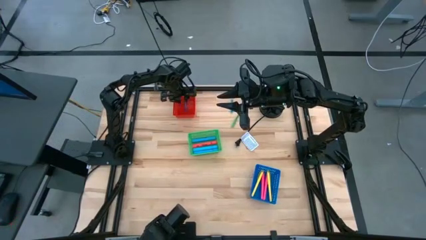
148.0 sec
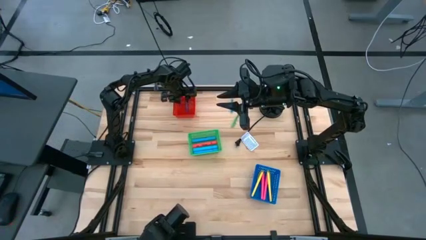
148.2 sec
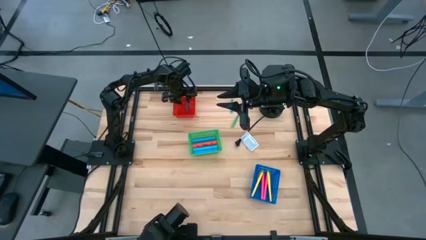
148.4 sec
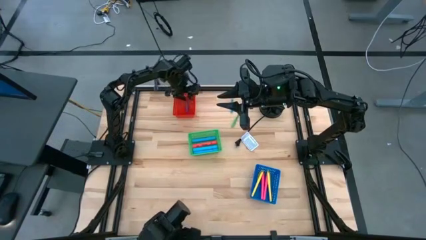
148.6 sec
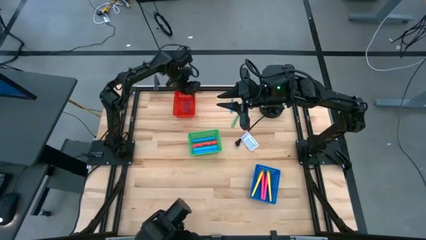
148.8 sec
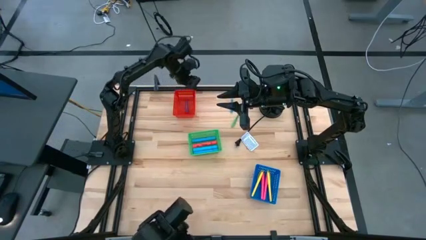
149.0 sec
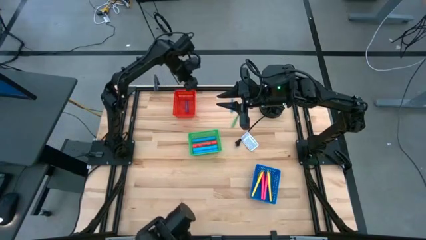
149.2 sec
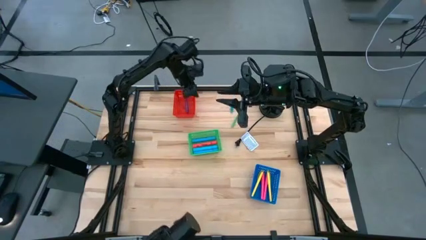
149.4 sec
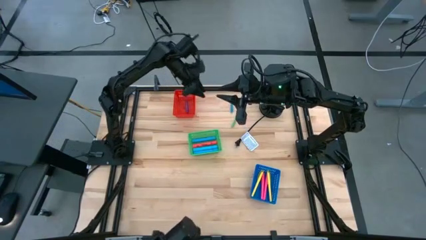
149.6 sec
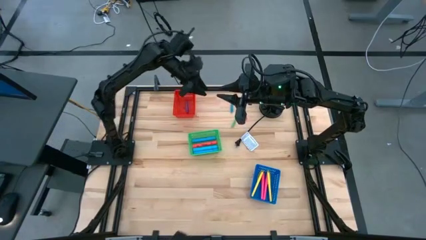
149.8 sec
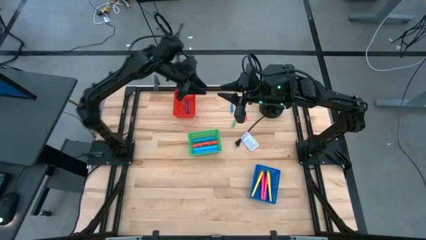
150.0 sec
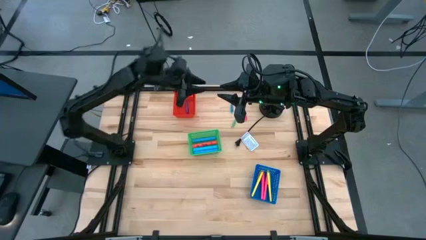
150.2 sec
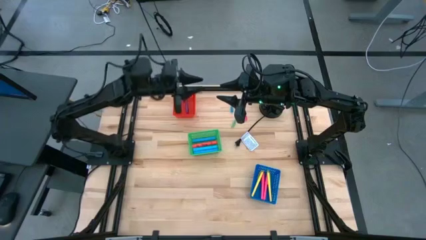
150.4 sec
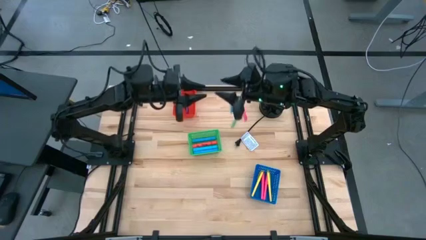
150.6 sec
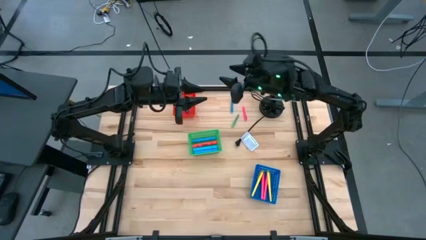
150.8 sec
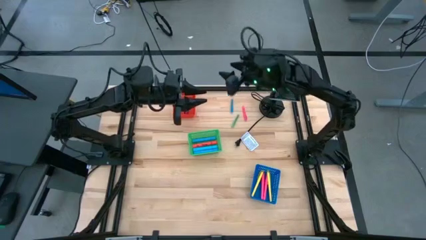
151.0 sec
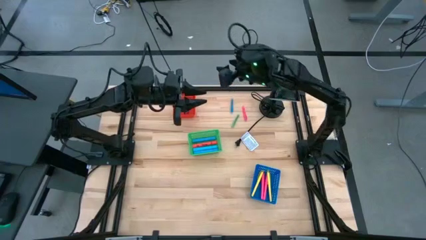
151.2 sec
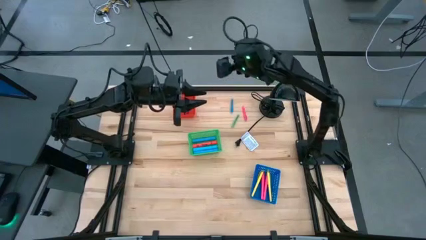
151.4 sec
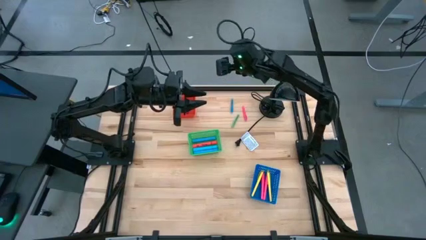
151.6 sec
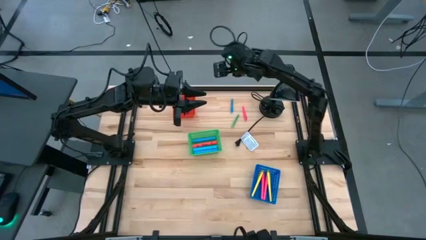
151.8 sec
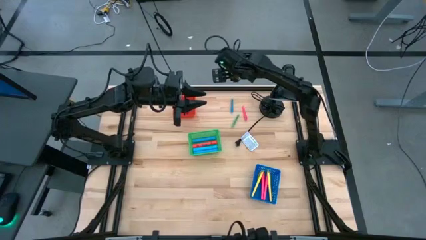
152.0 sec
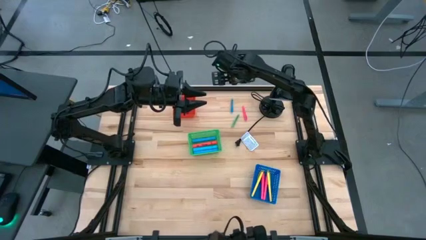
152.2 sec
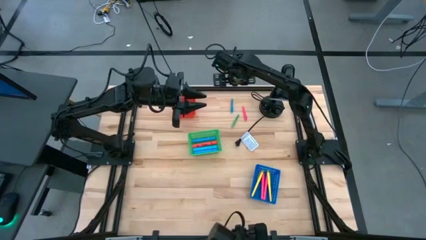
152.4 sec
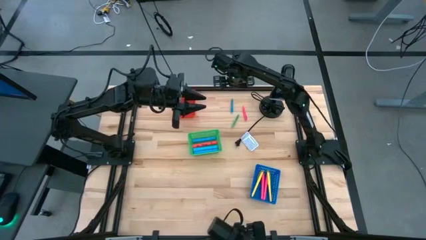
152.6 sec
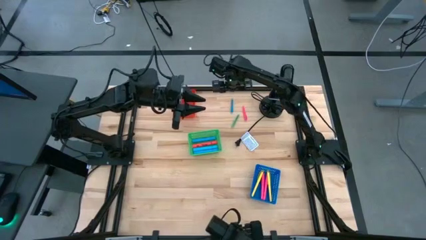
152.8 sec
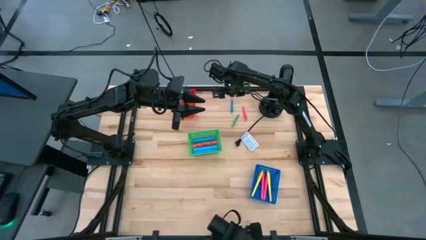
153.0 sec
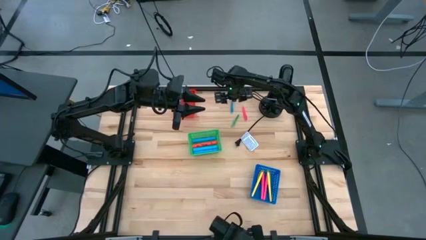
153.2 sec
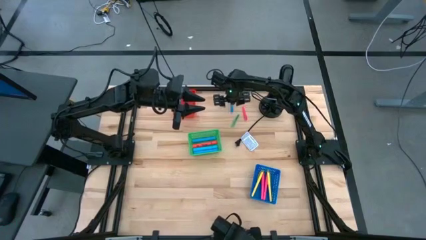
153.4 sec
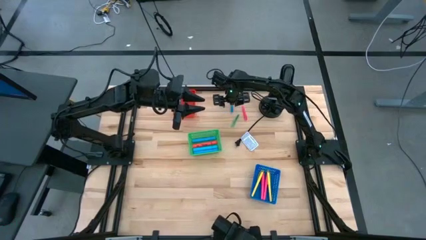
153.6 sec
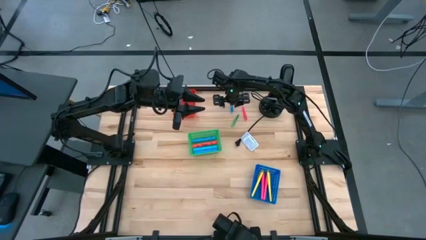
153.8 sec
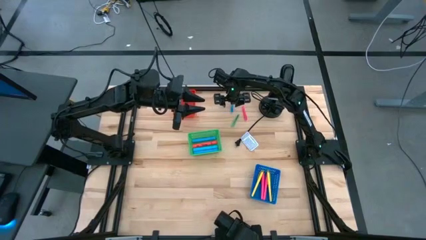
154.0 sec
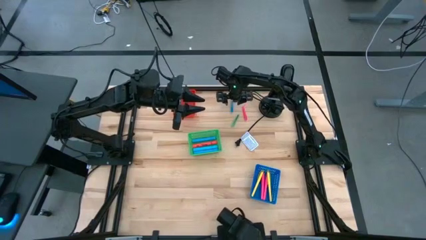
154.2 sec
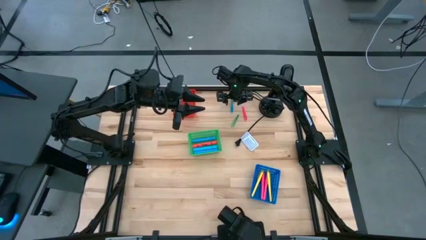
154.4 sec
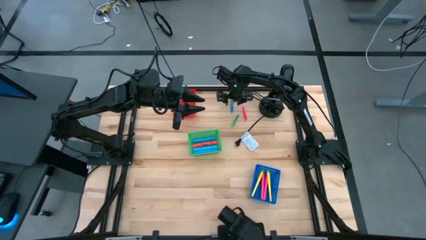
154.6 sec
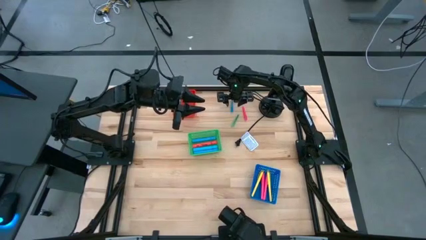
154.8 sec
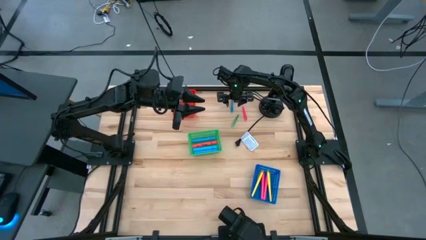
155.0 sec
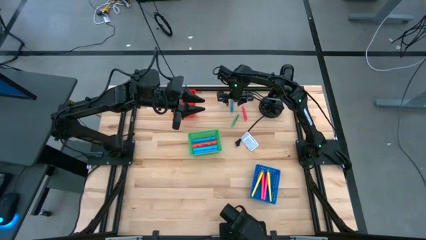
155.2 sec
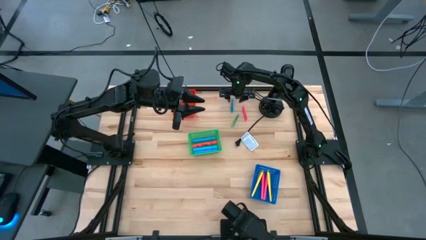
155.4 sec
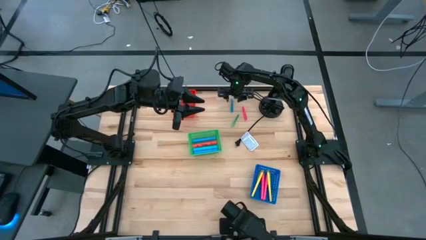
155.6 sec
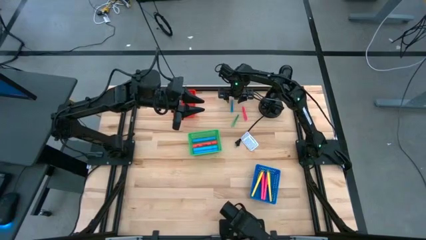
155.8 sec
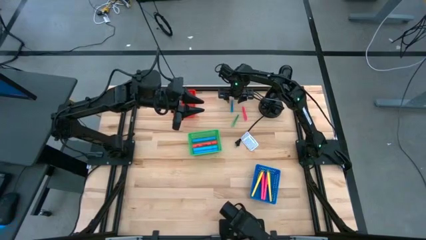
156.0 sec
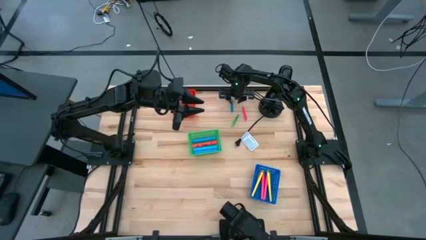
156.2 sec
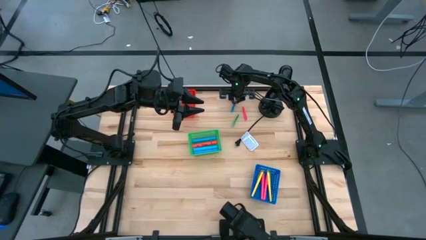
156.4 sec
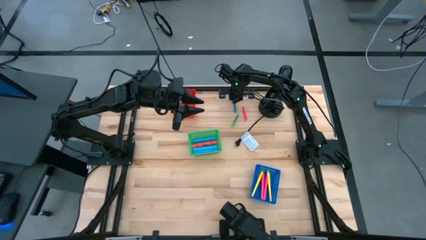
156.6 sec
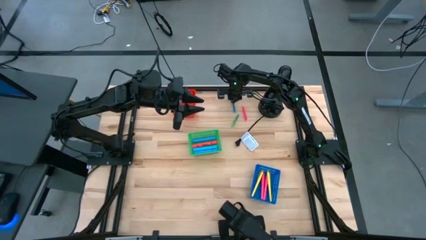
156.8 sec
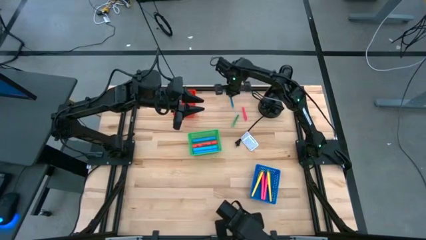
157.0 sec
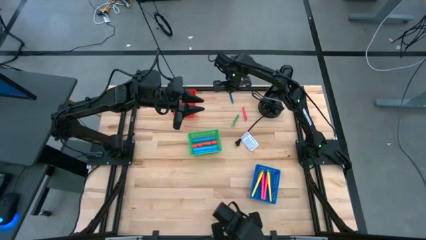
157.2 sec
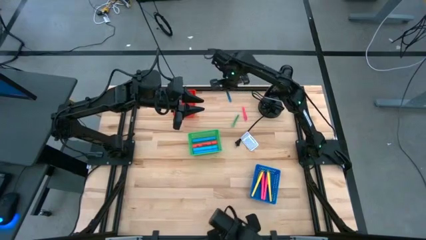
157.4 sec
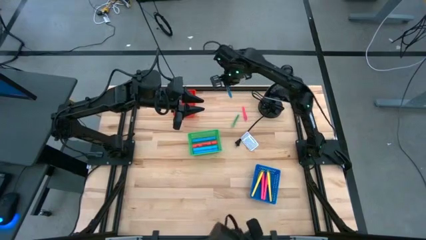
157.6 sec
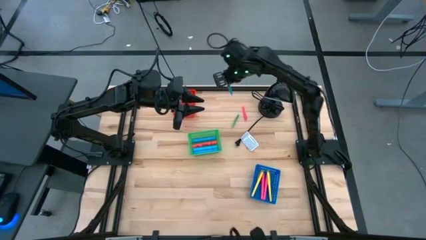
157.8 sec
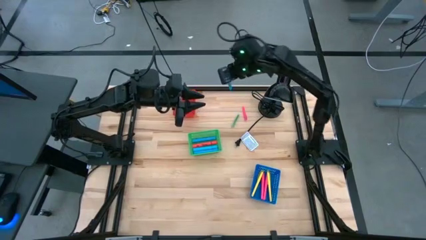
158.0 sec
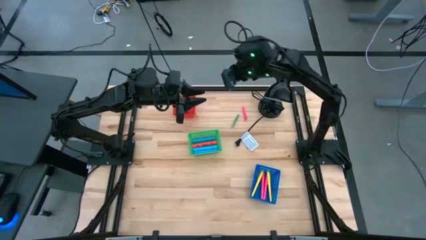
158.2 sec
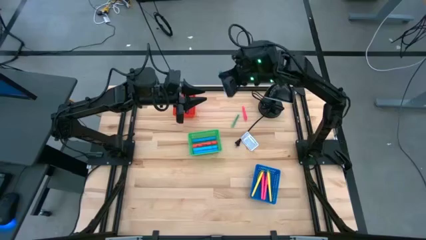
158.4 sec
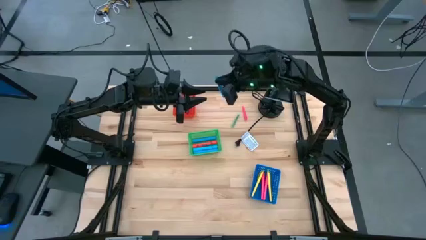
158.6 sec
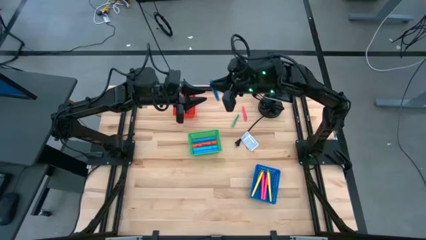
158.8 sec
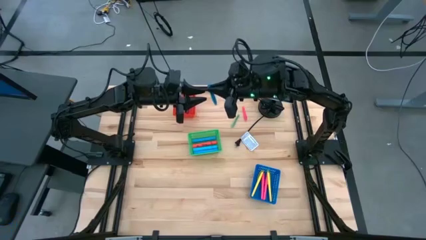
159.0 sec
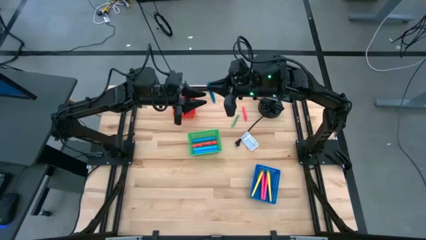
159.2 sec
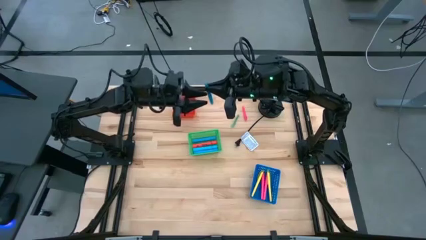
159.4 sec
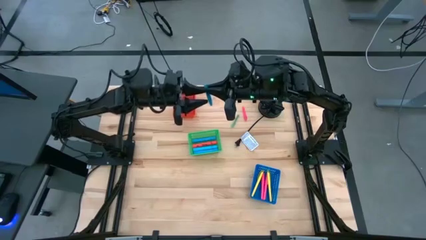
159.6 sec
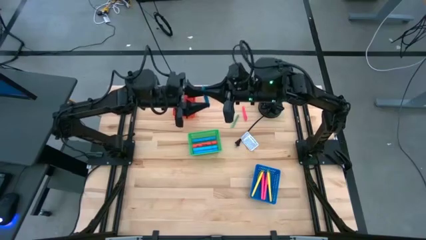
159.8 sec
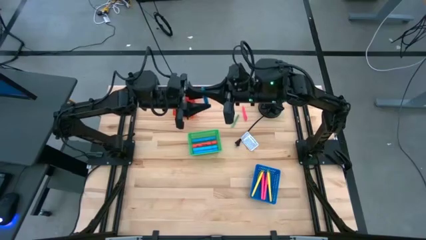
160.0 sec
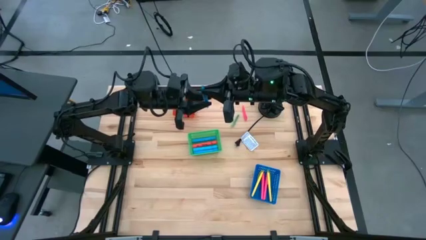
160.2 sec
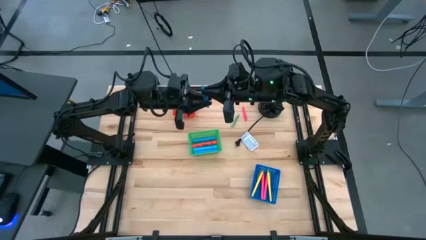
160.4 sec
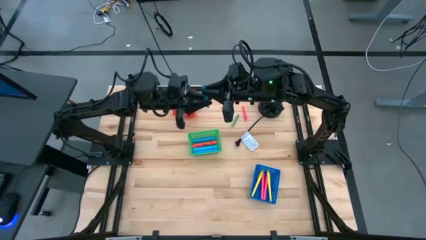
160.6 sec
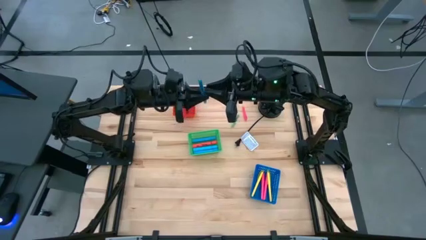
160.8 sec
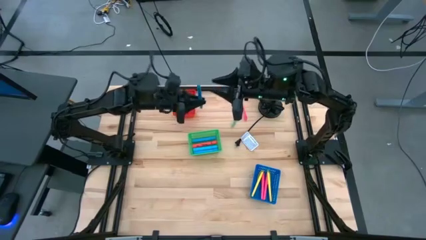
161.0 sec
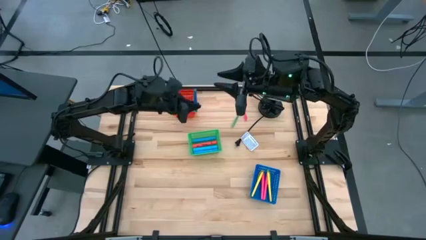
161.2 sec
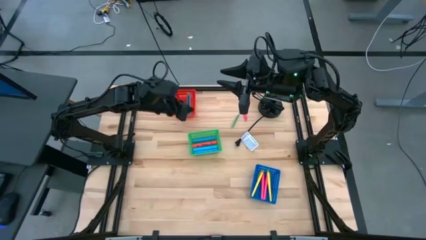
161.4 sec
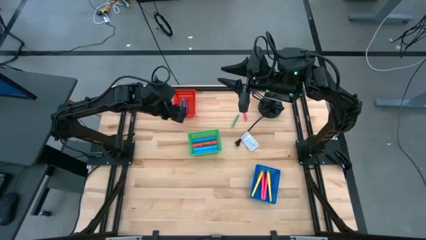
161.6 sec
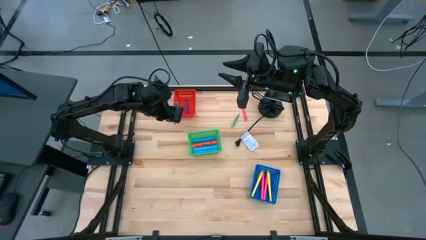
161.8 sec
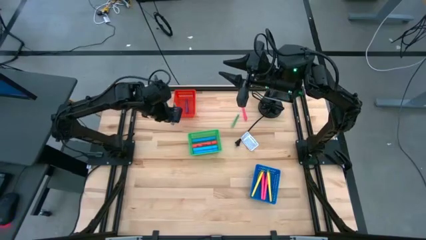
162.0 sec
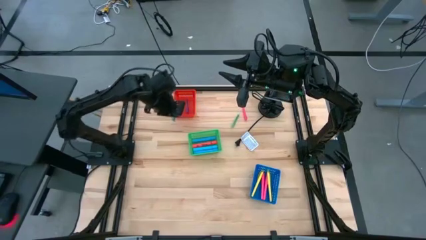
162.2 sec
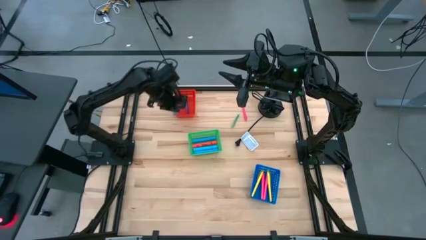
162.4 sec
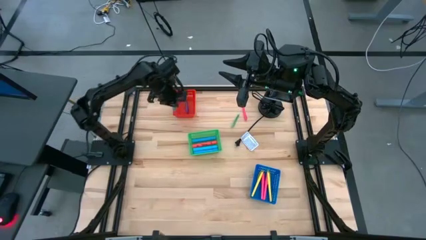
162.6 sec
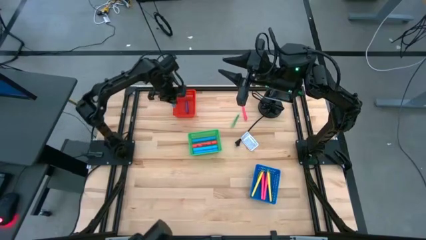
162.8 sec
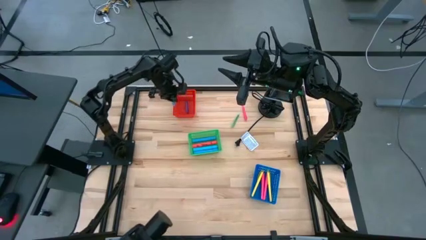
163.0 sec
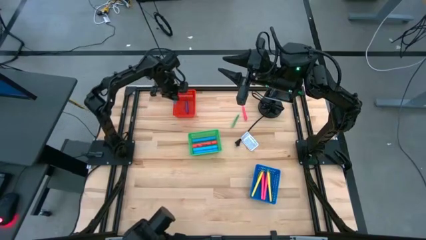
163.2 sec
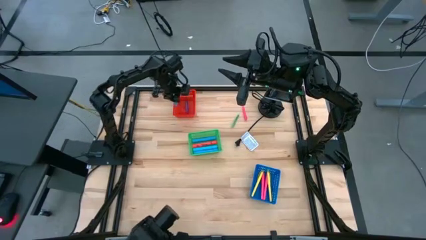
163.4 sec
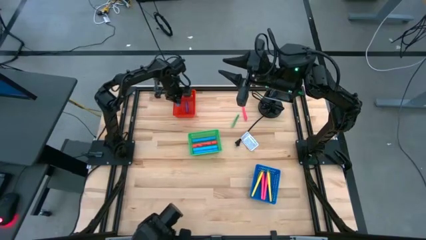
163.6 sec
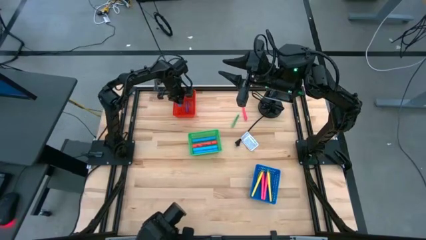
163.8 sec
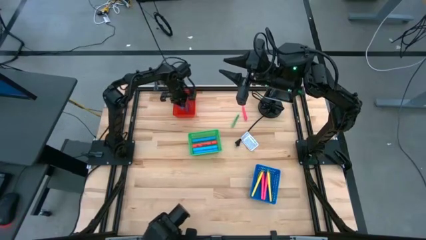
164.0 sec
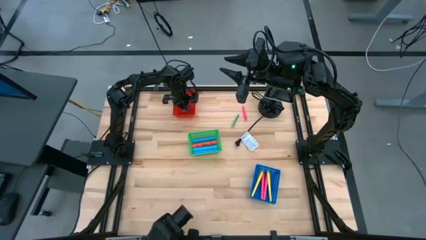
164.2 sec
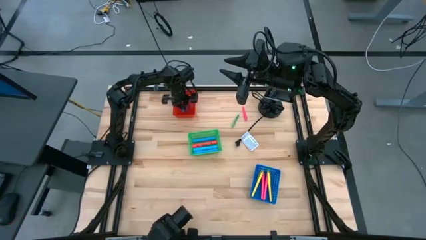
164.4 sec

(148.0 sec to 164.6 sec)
Task: Pick & Place Markers
Put the small blue pen into the red bin
